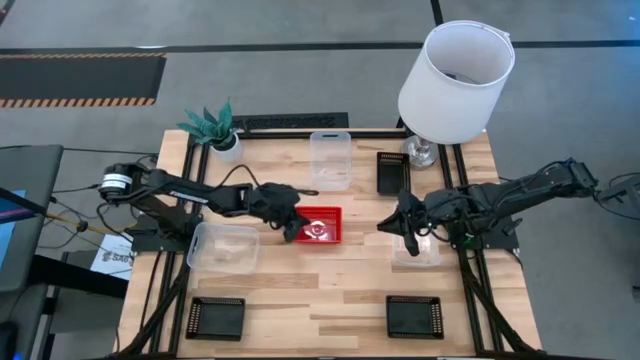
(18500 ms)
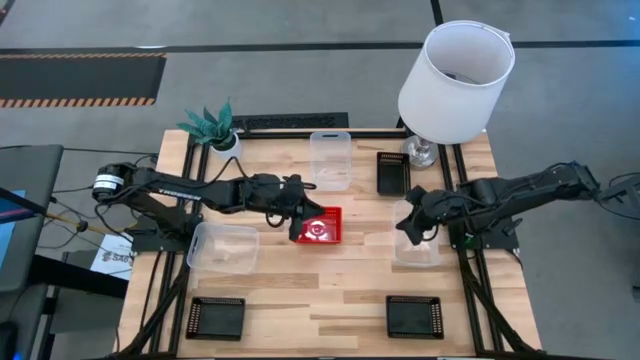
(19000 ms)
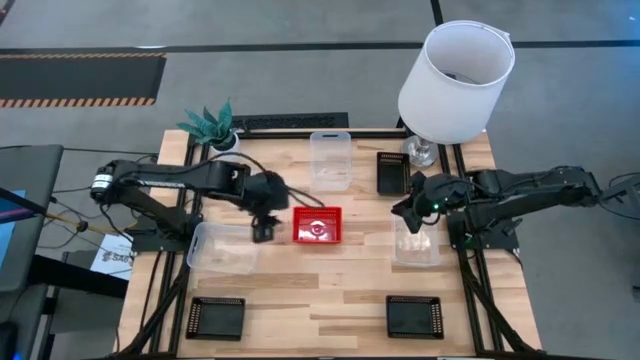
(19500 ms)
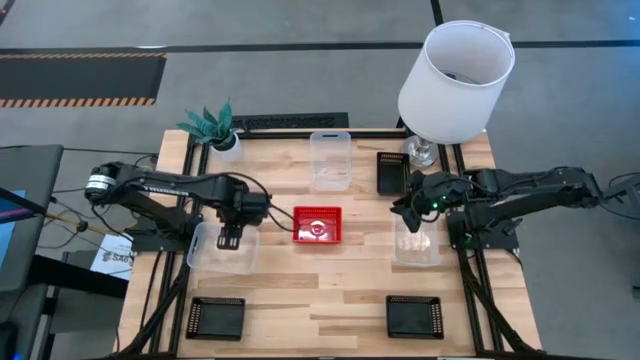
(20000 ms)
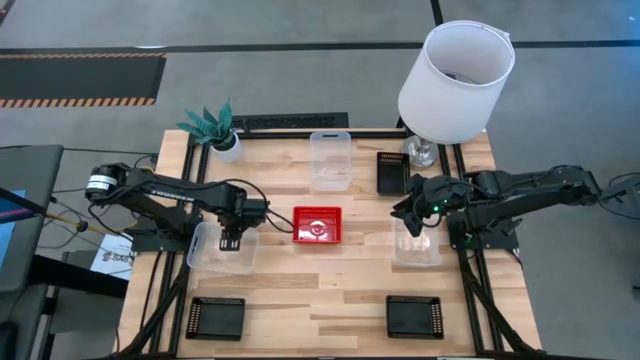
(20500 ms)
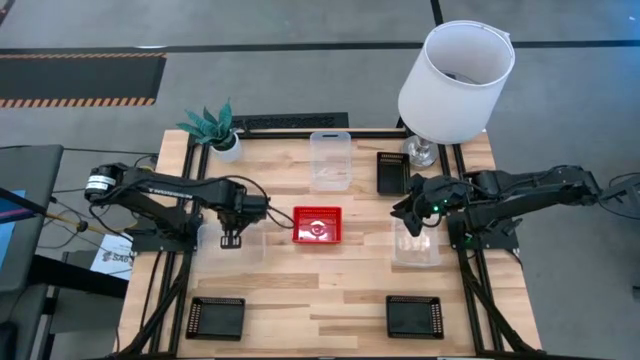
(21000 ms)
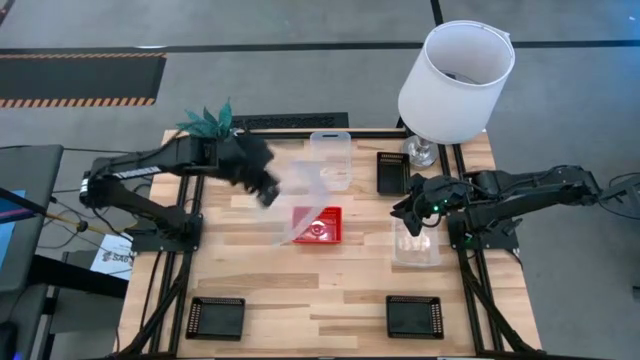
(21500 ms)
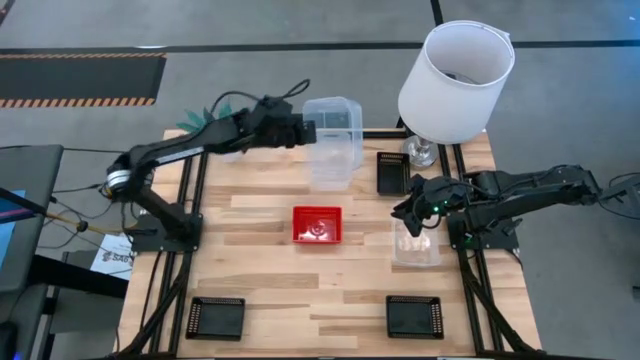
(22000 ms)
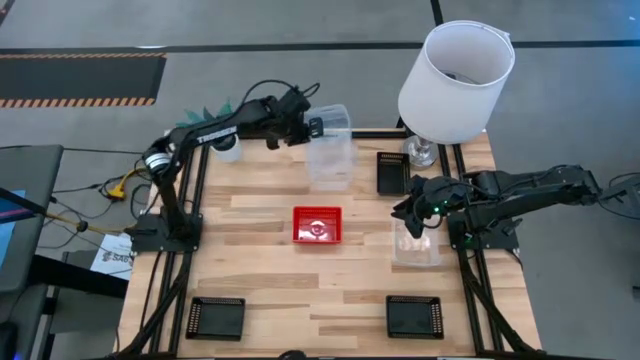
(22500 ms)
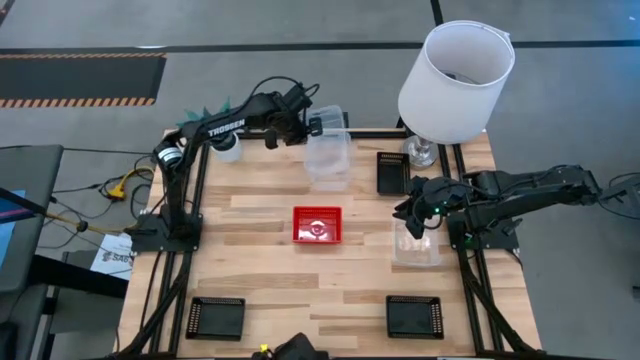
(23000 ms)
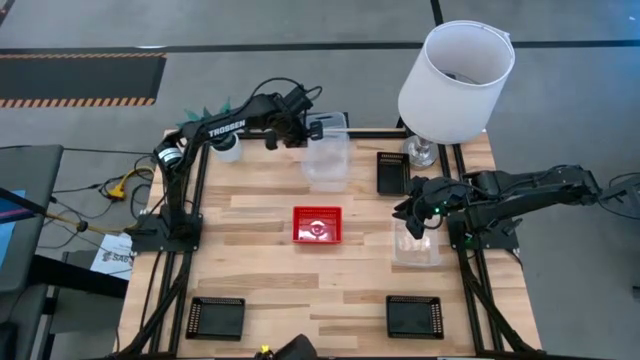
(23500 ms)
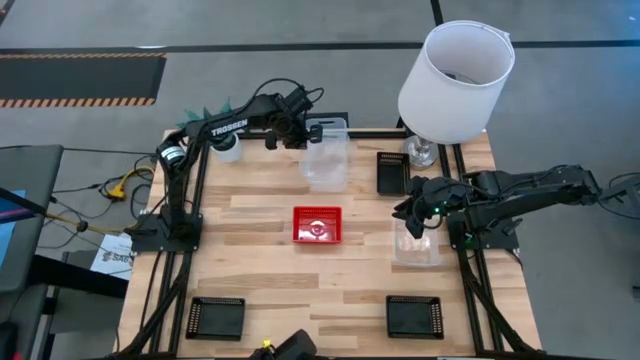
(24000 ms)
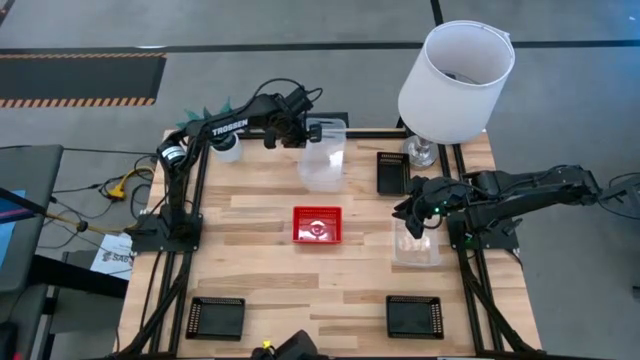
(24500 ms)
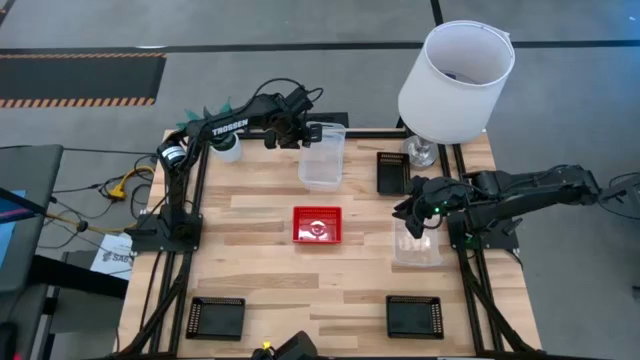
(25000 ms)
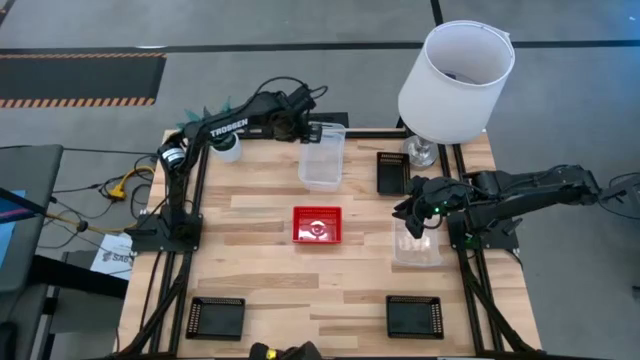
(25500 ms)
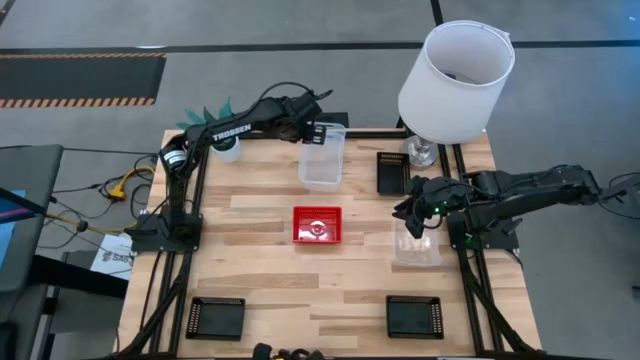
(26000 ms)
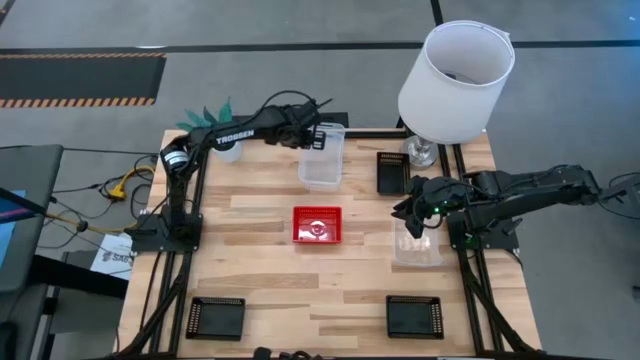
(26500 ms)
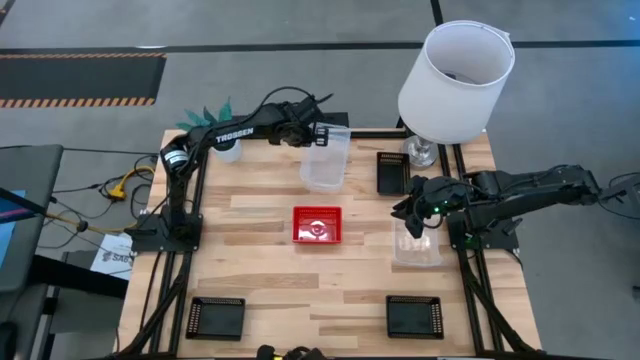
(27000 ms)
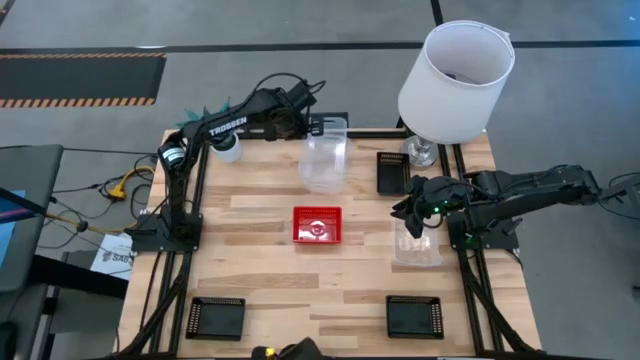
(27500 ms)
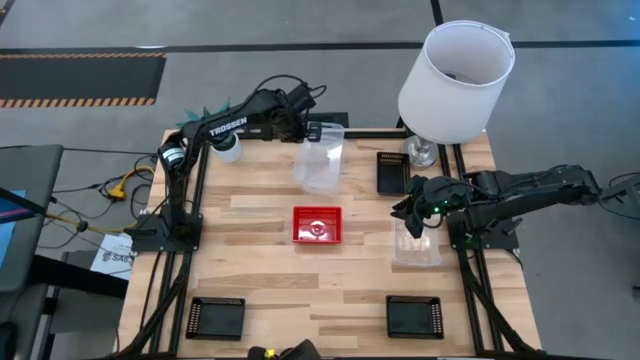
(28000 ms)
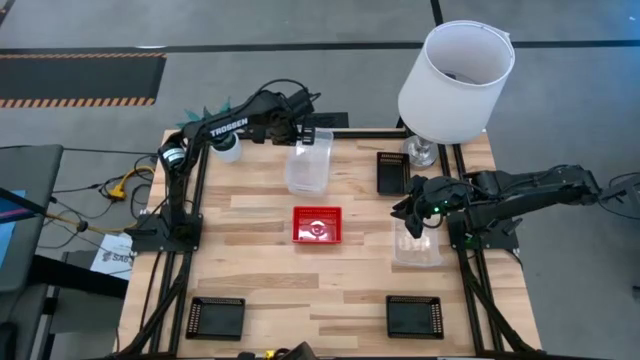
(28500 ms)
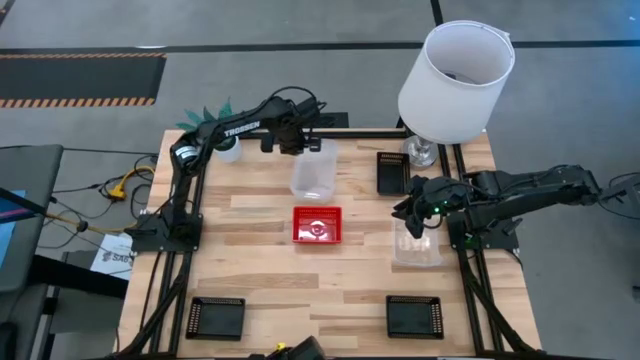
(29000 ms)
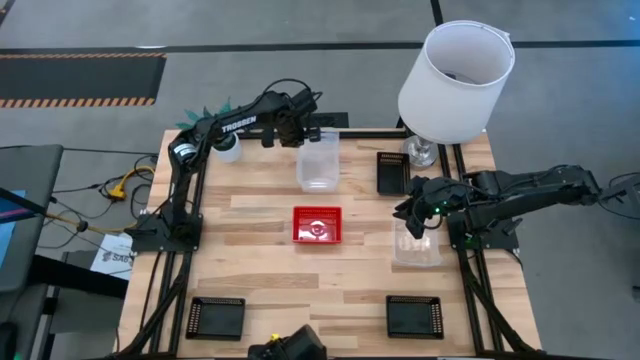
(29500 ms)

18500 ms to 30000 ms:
Stack the bottom left transparent bin on the top transparent bin

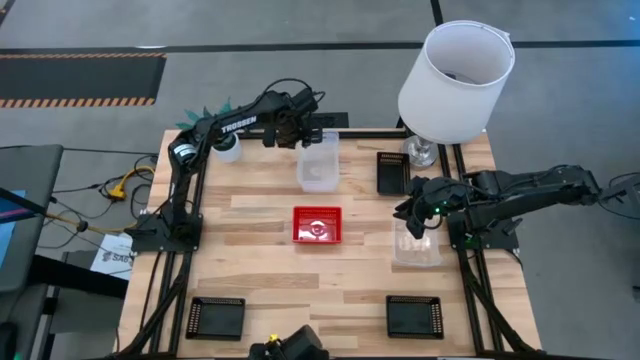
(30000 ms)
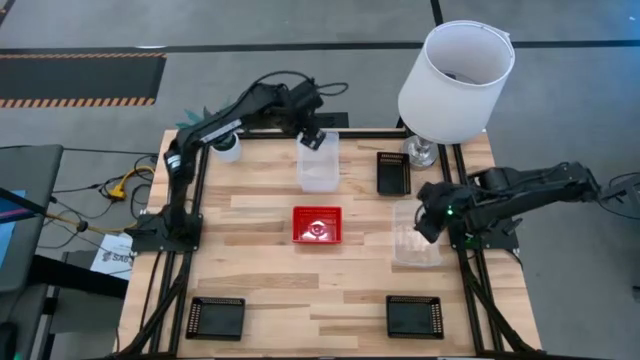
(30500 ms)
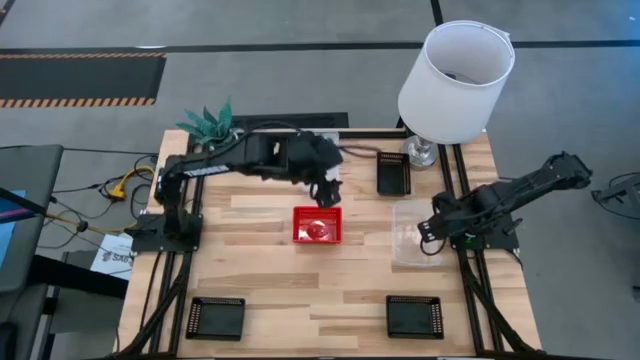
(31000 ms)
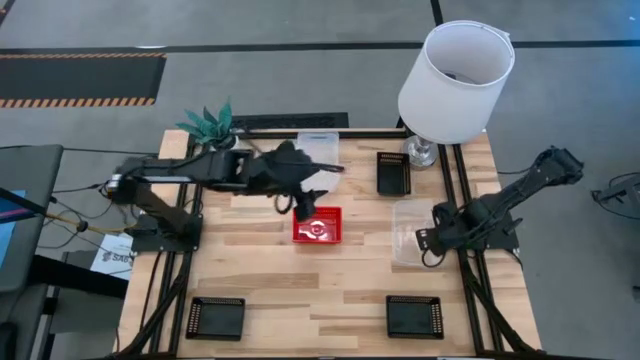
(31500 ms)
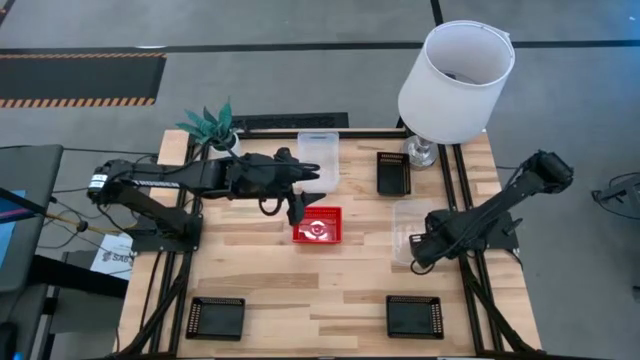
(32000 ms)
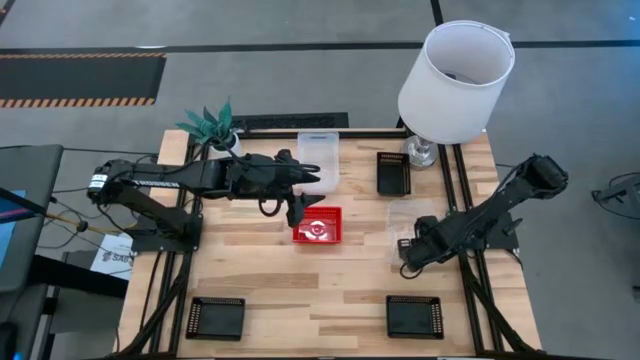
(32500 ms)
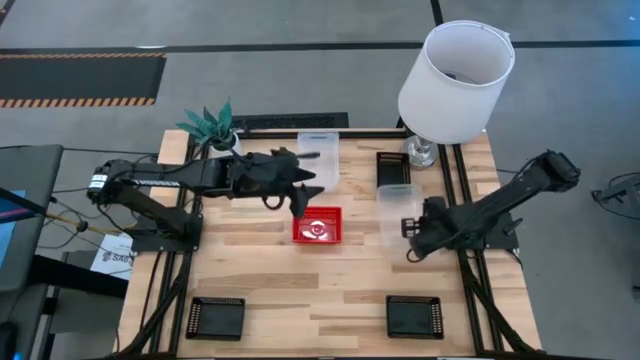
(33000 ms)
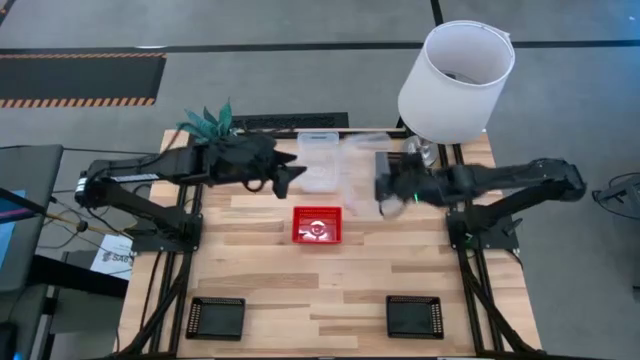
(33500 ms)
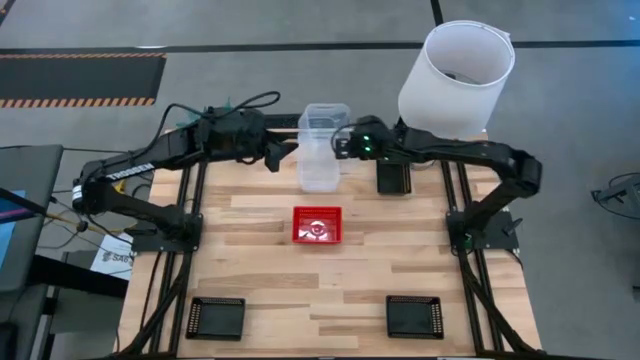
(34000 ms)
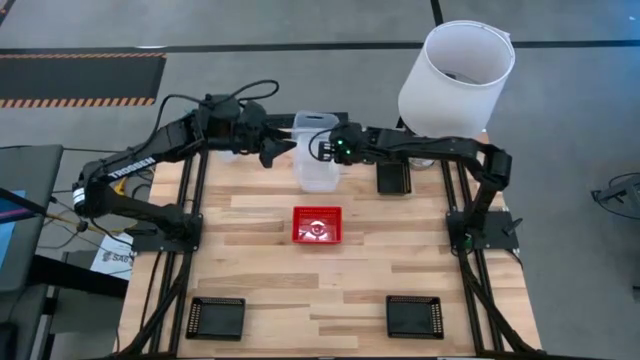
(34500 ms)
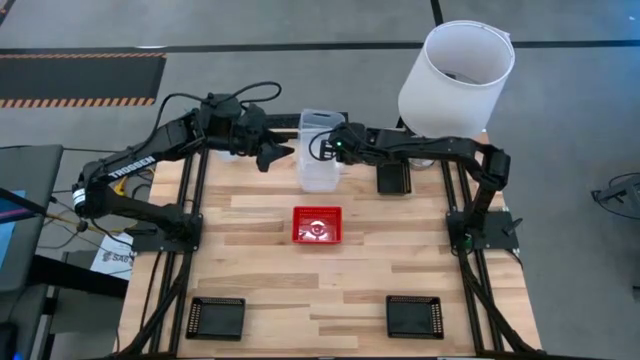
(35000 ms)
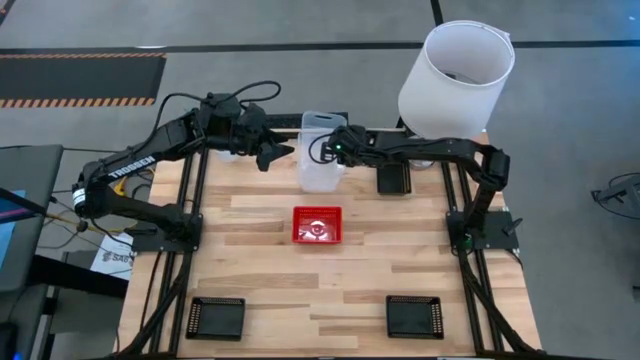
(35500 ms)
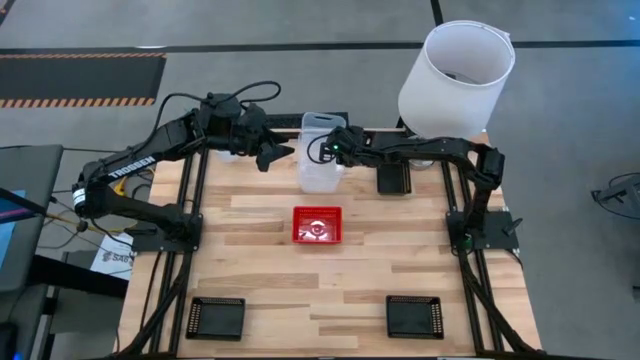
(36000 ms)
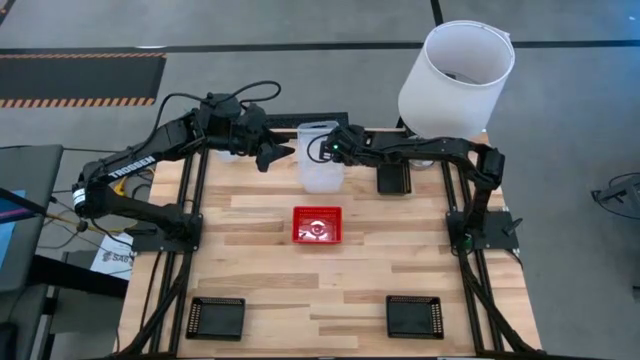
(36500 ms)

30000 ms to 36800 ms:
Stack the bottom transparent bin on the top stacked transparent bins

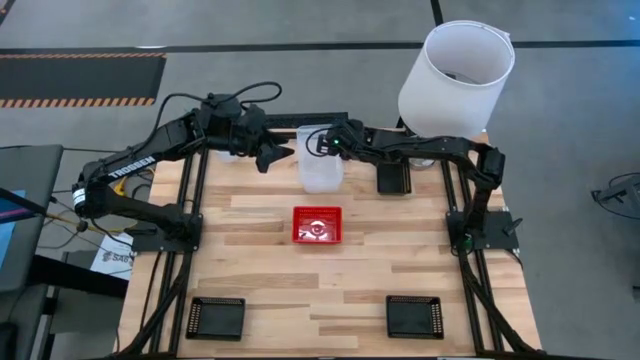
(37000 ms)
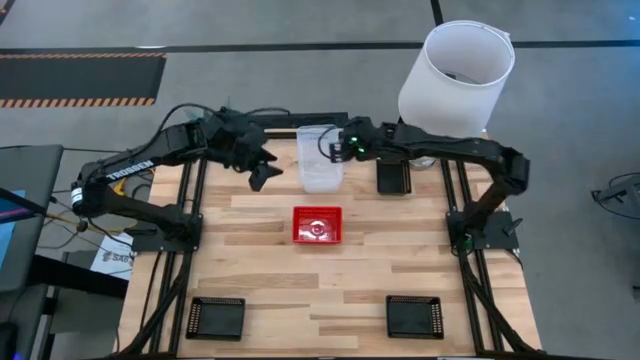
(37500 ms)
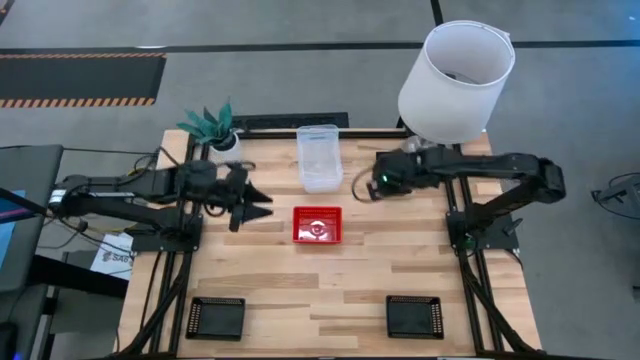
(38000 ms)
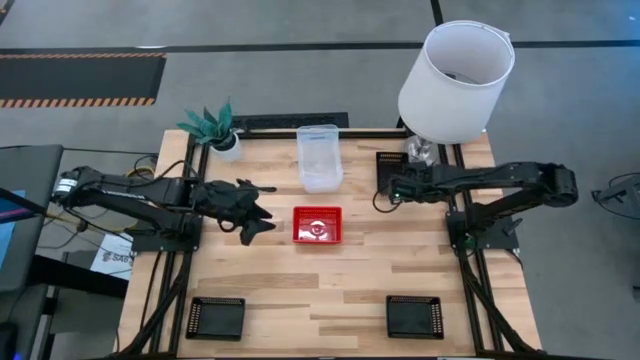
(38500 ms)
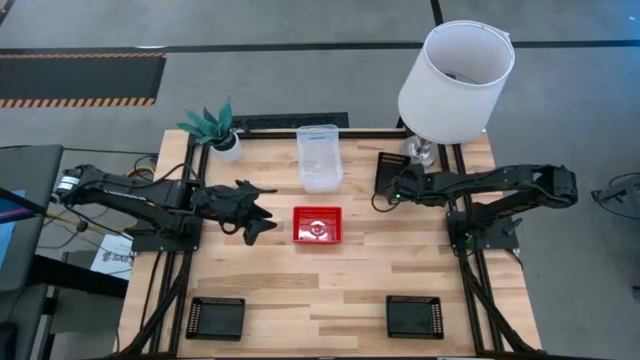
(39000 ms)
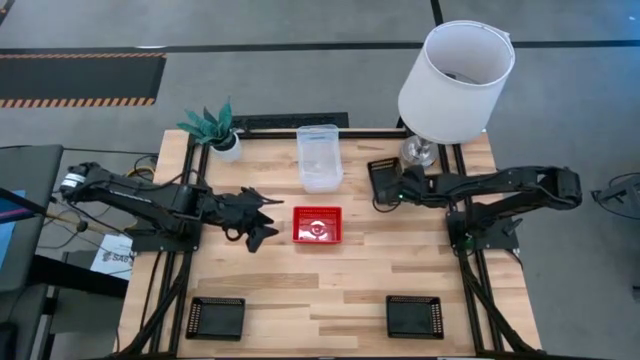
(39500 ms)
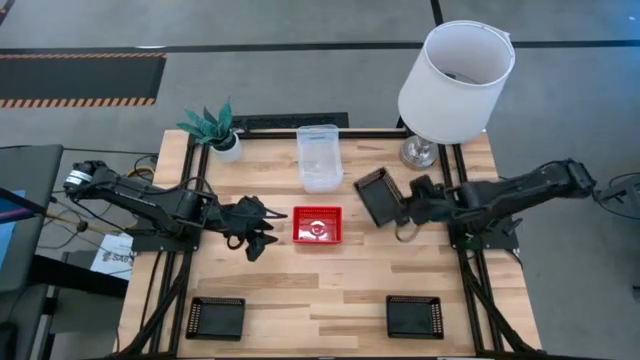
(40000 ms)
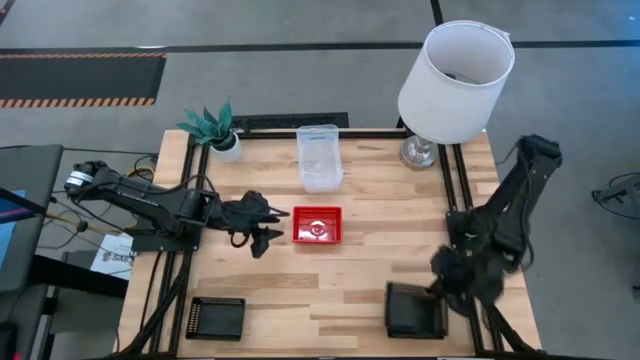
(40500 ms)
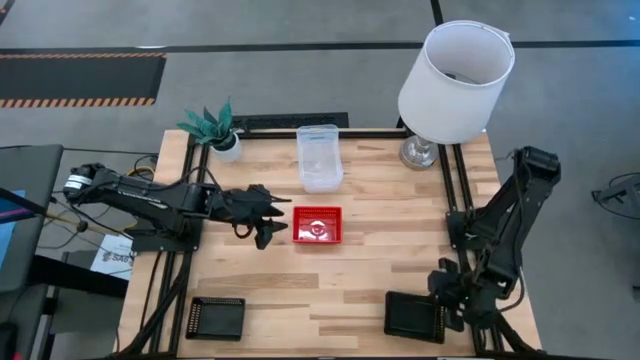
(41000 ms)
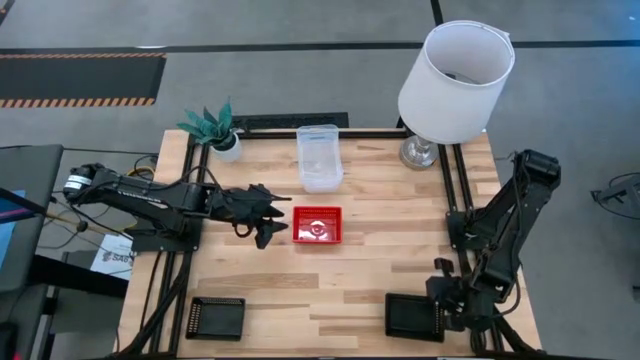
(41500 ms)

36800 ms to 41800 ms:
Stack the top black bin on the bottom right black bin
